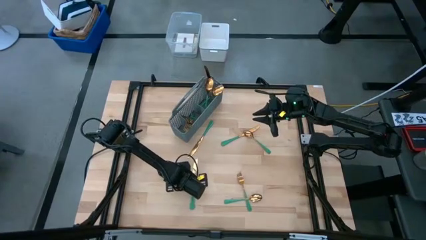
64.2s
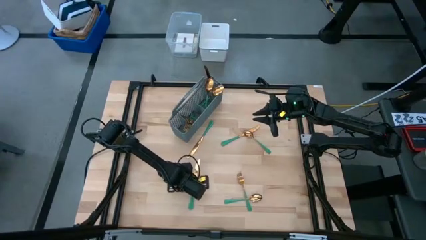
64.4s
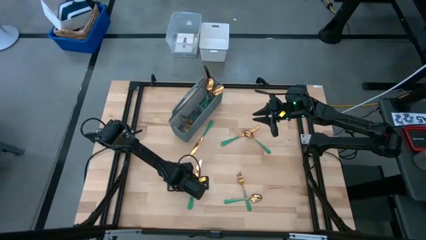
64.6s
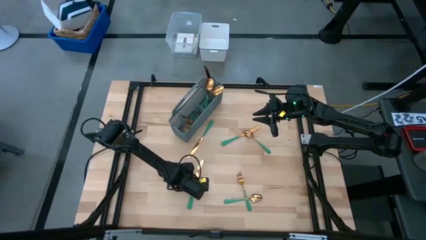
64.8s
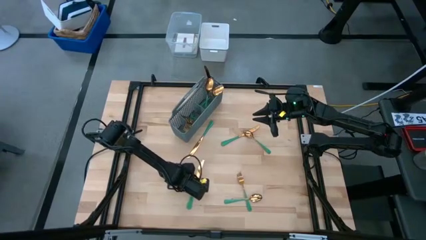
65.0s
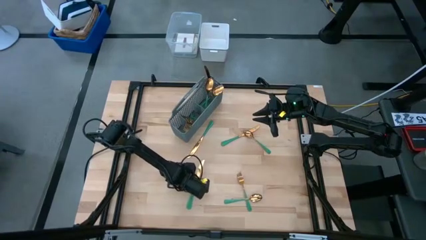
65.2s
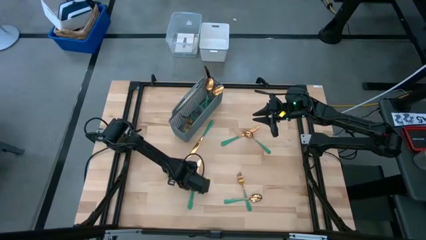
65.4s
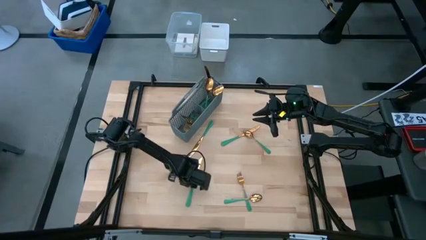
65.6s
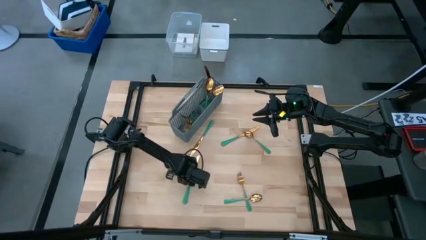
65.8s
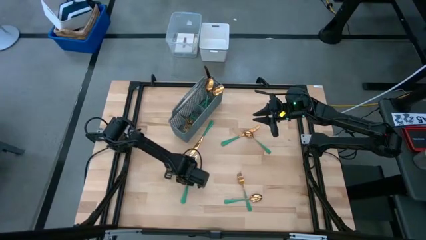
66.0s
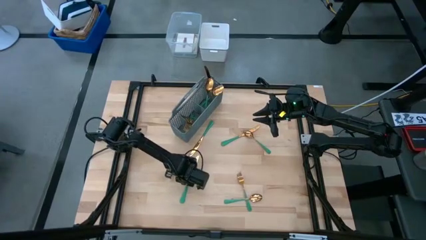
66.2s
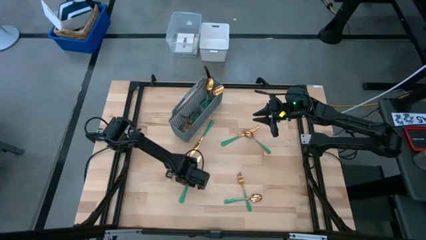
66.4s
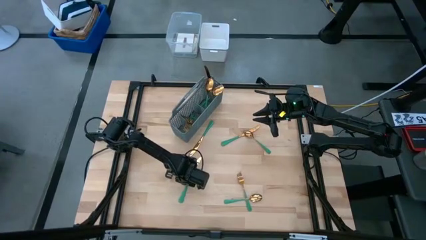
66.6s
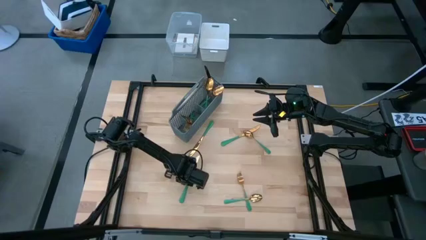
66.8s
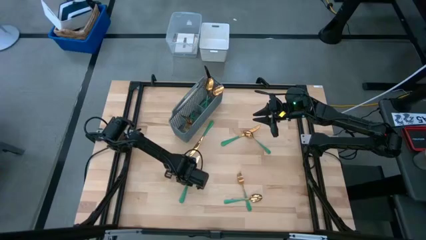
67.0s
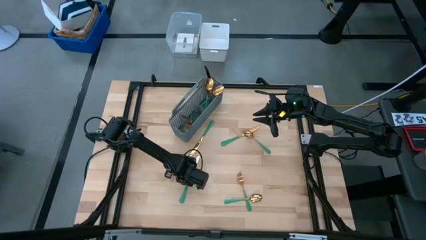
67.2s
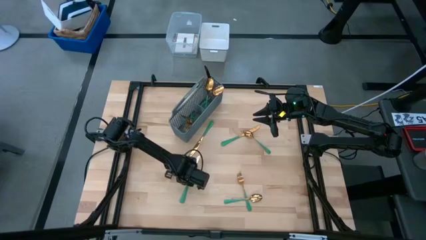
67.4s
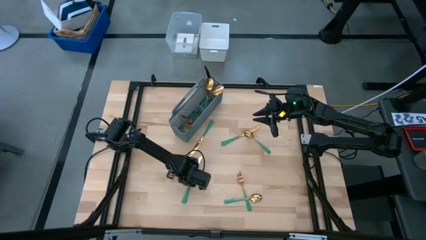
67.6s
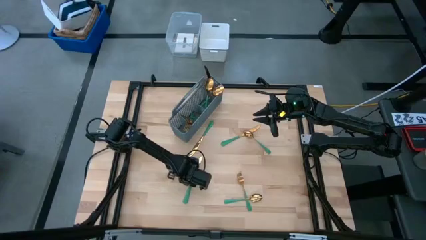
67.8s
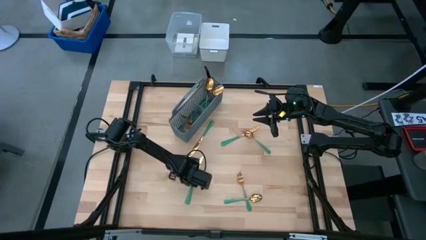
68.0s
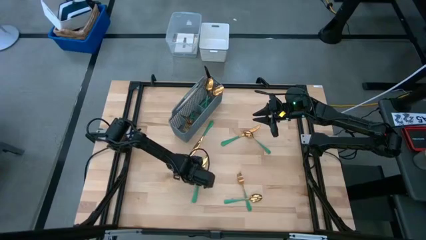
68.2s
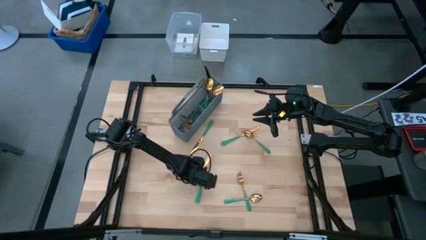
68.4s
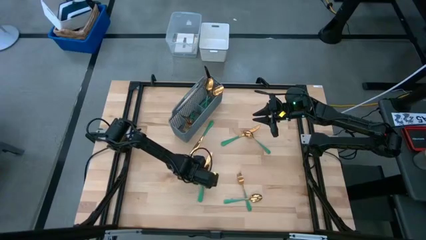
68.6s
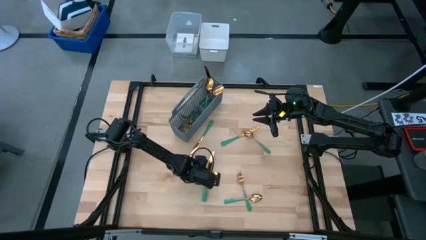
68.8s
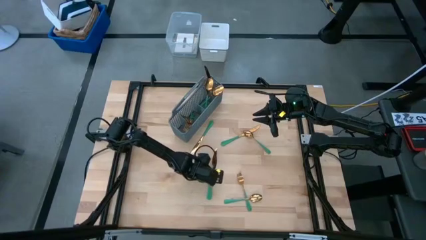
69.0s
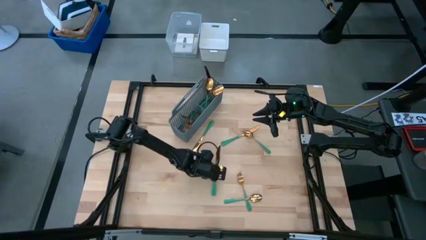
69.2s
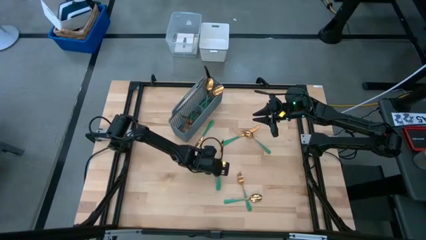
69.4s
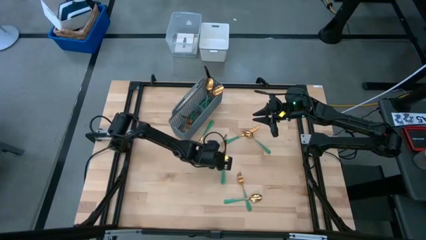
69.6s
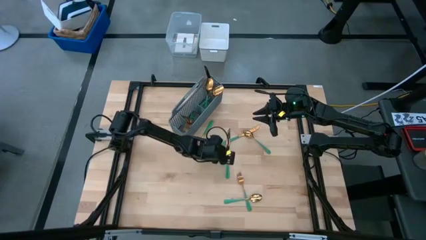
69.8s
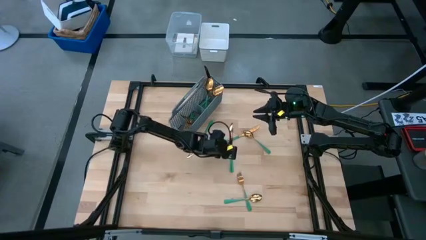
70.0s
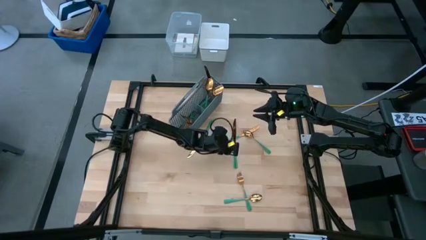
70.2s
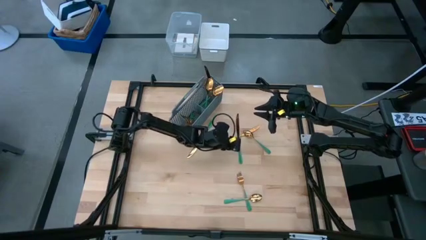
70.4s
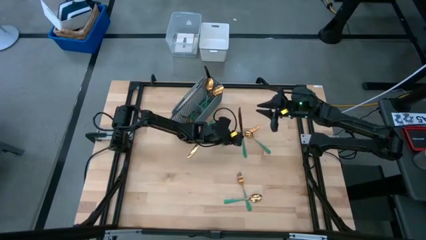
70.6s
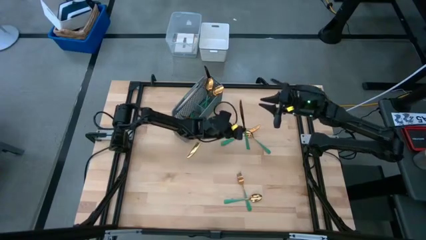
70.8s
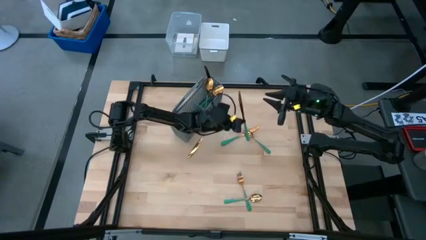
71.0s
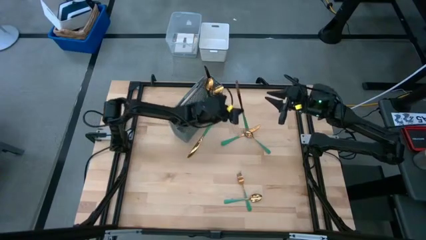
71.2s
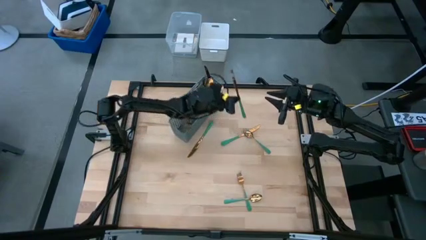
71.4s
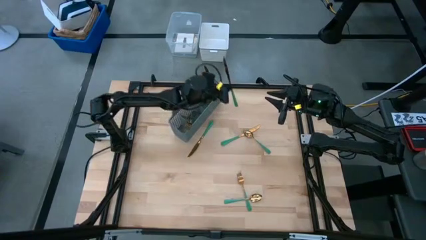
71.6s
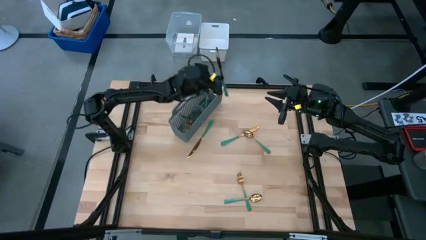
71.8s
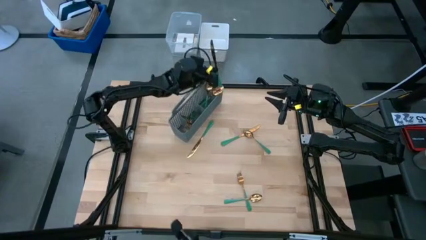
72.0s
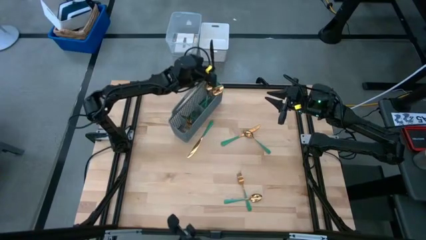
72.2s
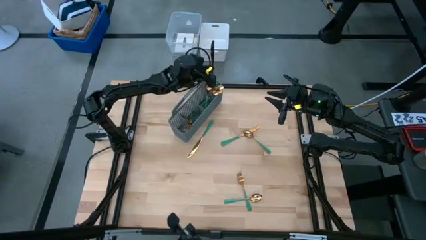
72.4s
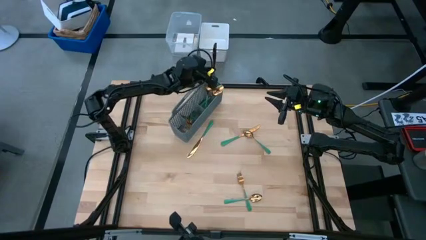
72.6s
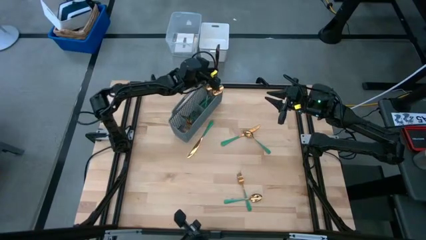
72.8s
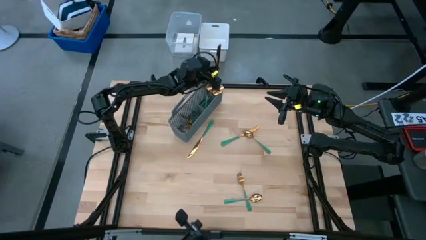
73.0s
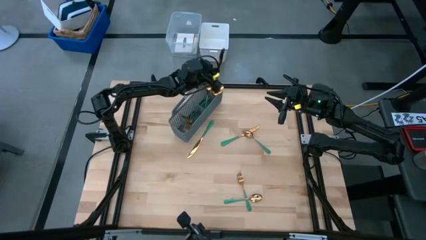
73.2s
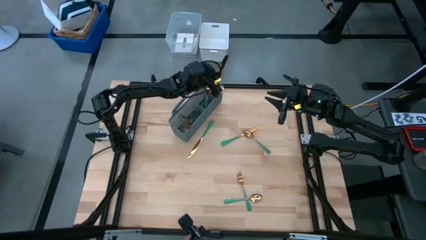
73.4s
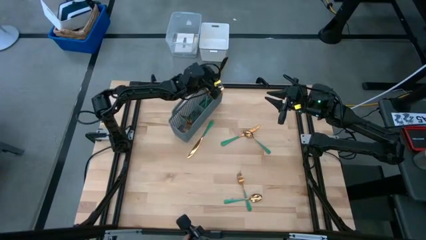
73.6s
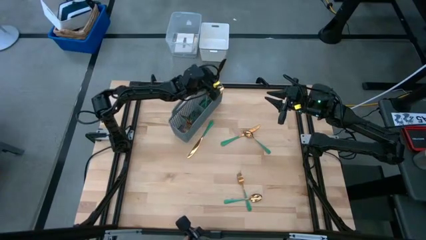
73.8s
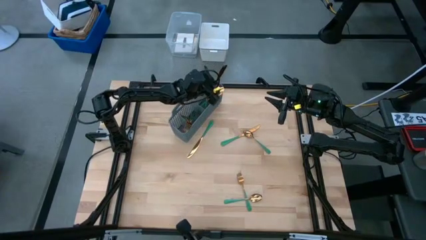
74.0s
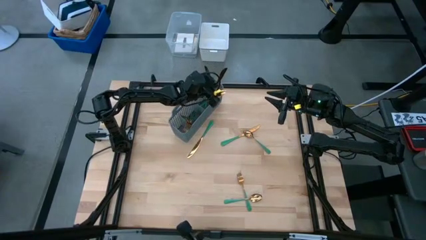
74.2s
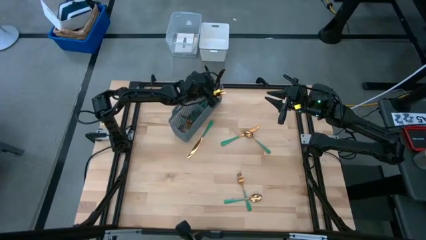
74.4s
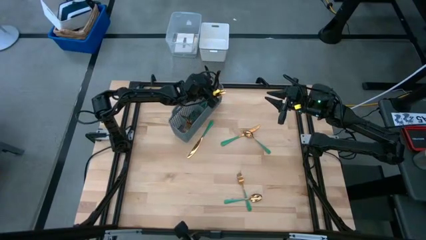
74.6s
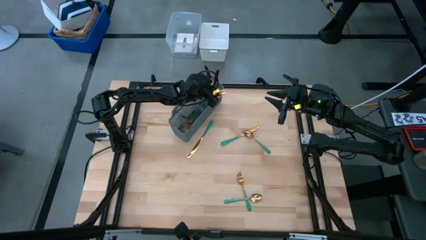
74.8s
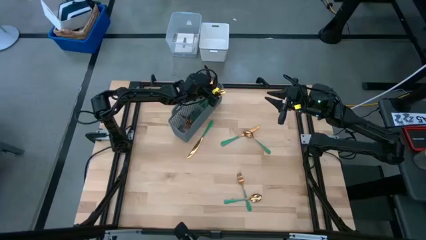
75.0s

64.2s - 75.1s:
Task: Sort silverware
Put the bottom green-gold table knife into the silverware basket

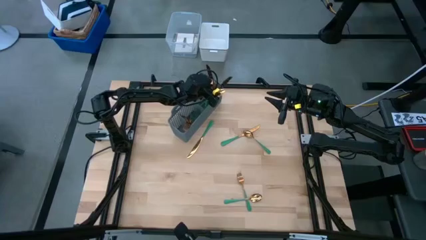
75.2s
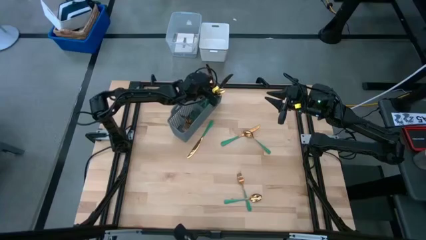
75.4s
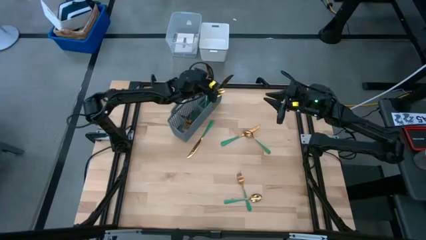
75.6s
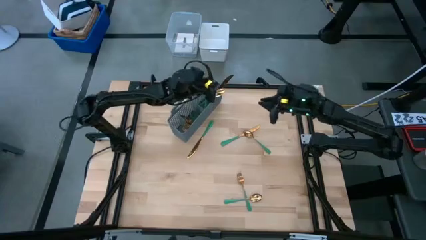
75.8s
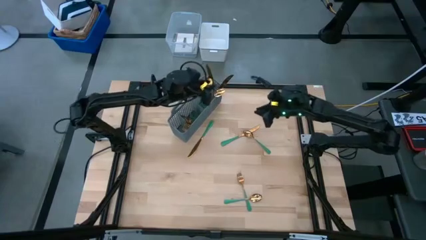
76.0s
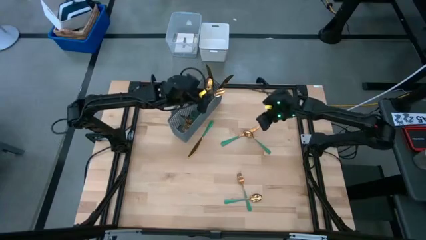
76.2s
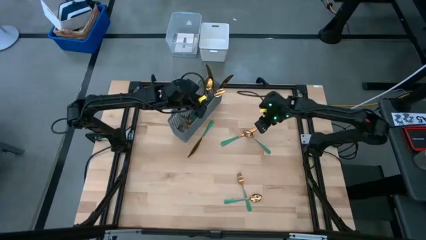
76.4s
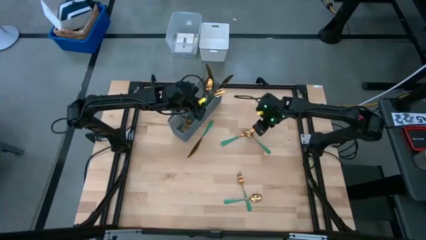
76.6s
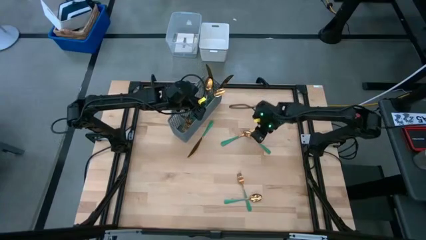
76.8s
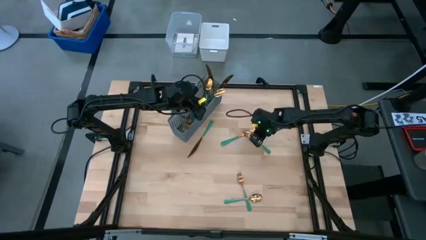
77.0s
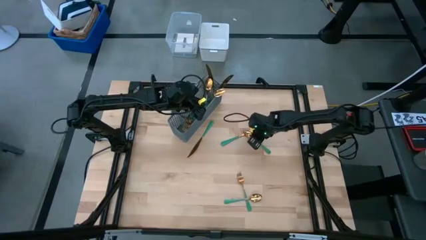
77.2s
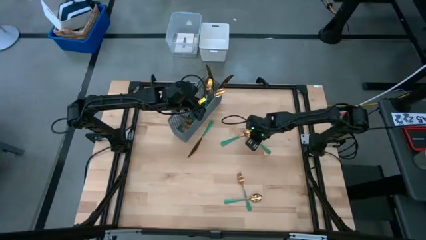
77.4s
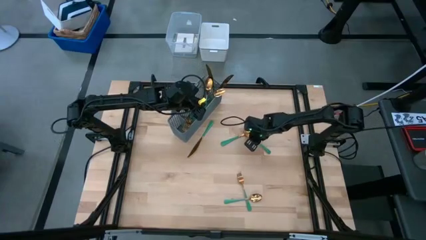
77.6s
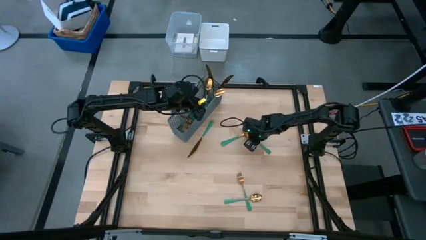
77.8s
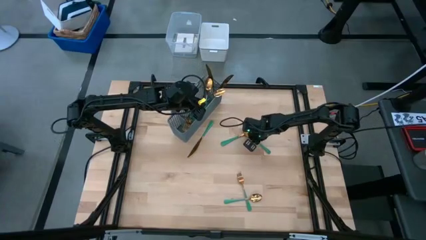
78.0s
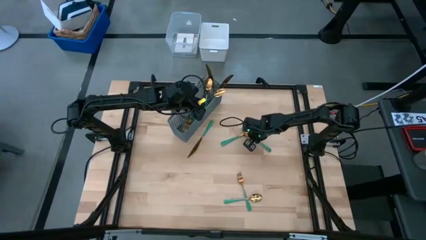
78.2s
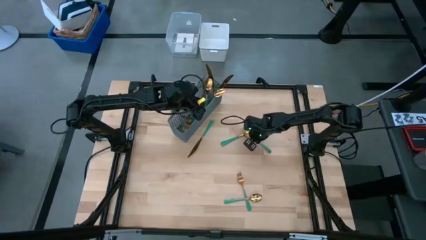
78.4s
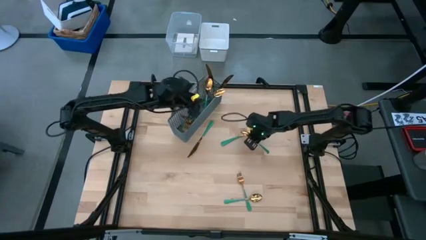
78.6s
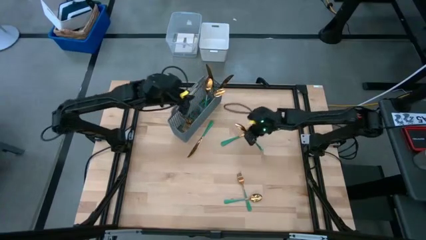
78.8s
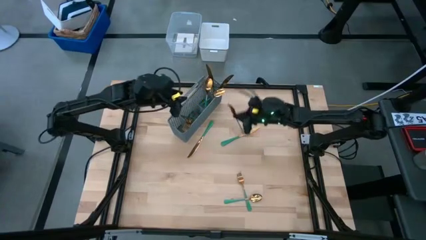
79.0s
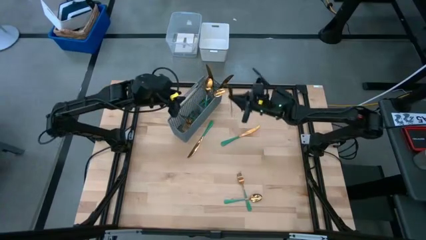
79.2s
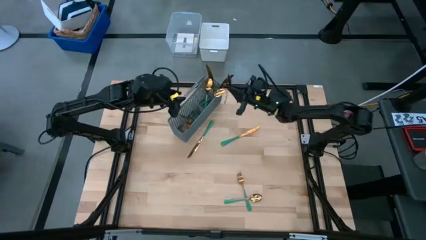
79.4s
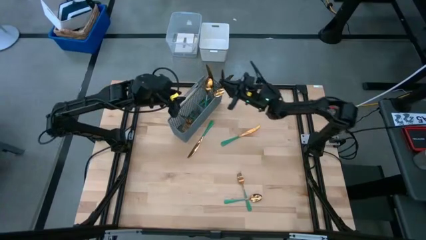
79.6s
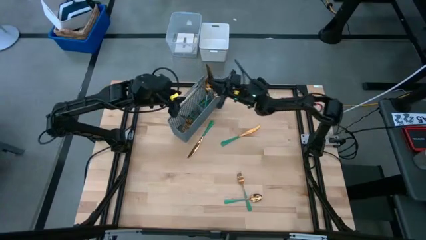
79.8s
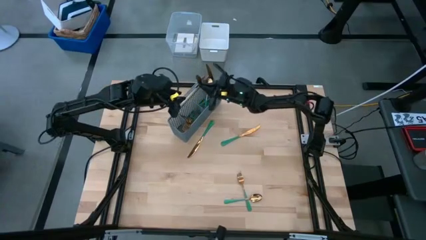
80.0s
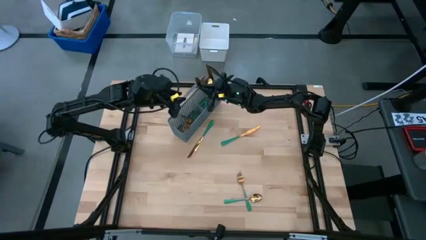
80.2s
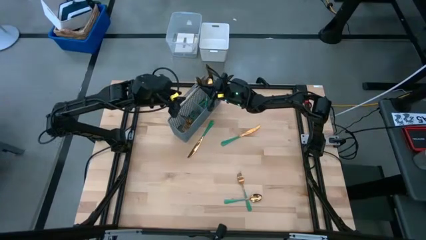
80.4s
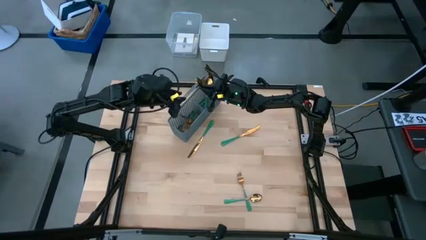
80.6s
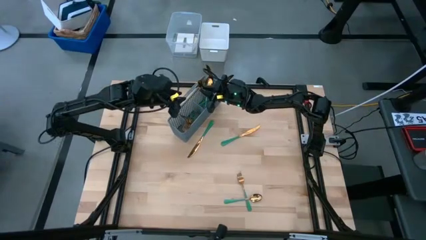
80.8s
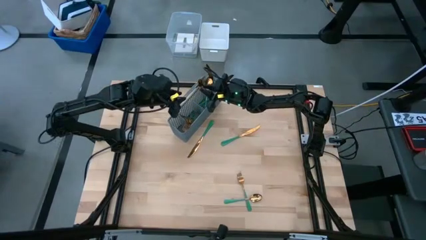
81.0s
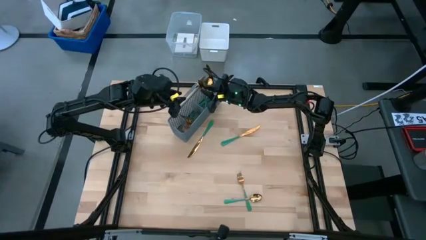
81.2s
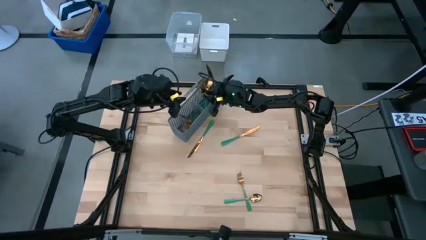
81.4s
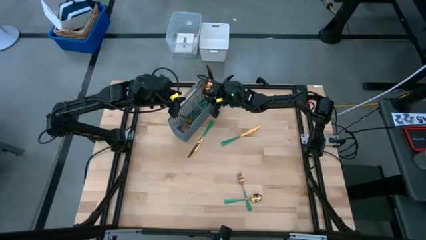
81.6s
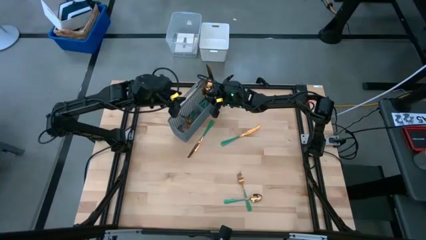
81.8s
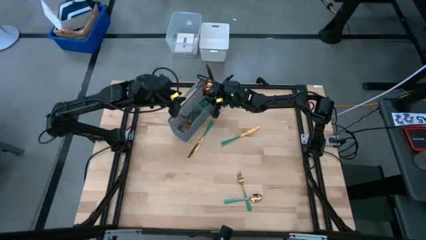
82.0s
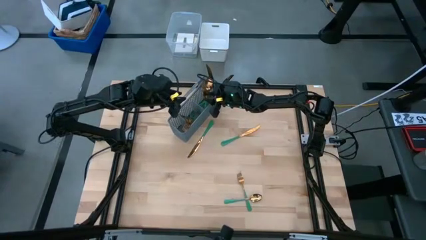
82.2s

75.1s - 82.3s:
Put the top green-gold spoon into the silverware basket
